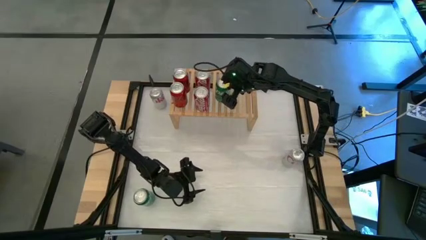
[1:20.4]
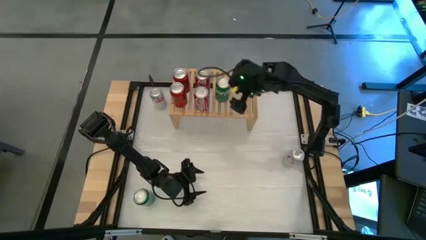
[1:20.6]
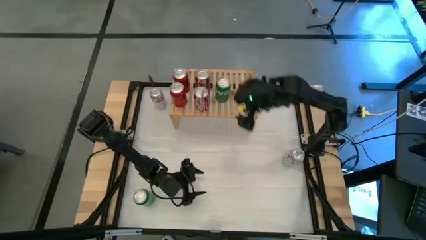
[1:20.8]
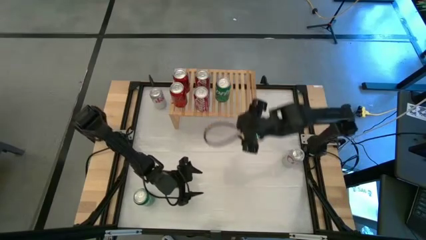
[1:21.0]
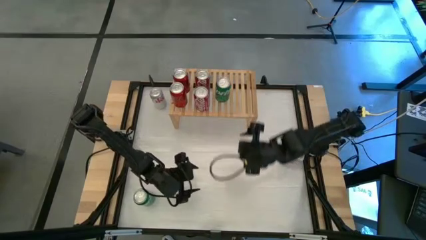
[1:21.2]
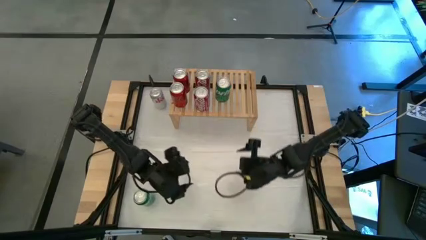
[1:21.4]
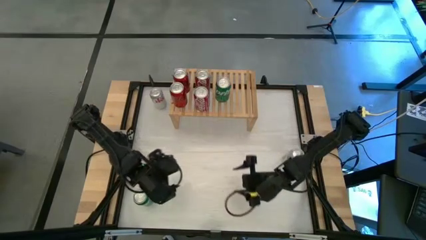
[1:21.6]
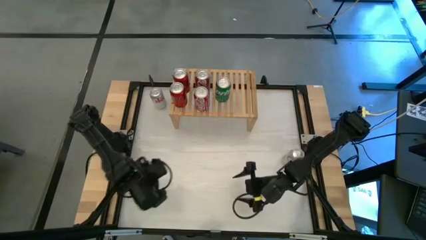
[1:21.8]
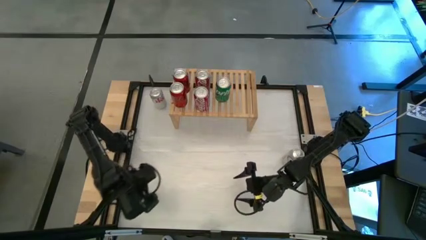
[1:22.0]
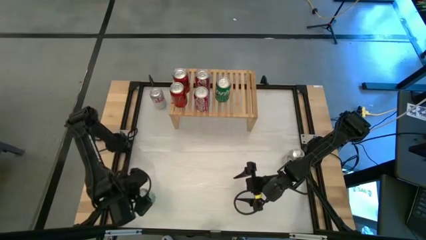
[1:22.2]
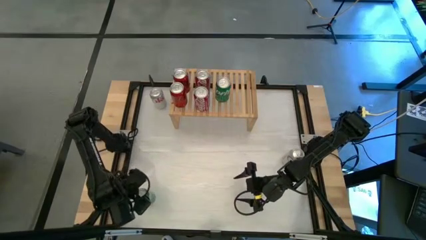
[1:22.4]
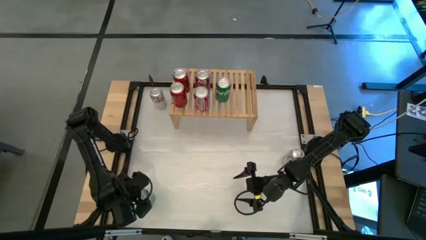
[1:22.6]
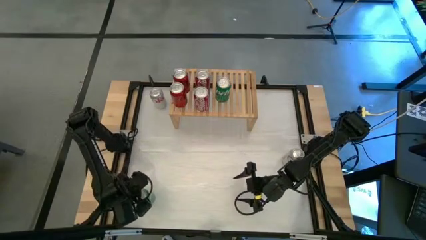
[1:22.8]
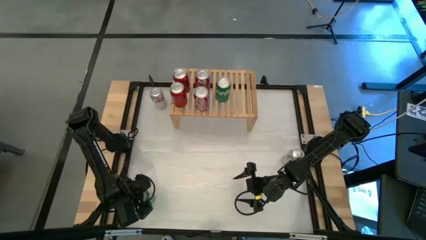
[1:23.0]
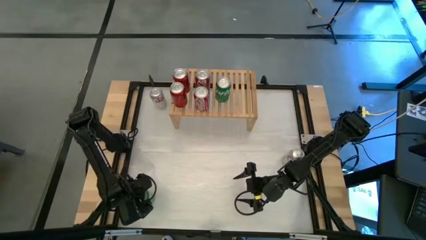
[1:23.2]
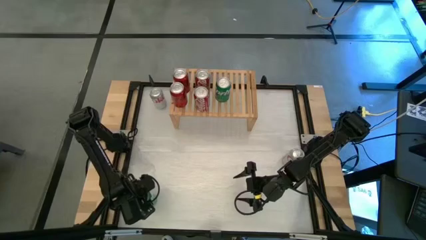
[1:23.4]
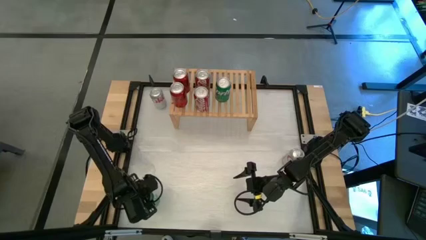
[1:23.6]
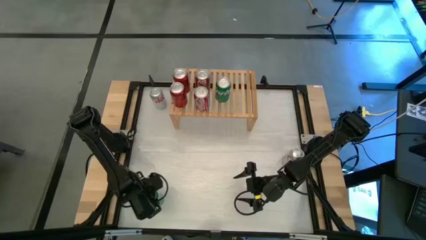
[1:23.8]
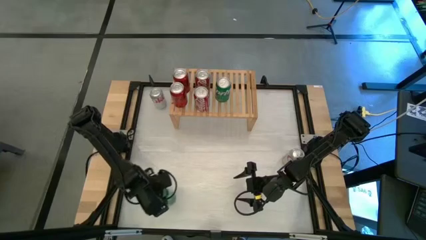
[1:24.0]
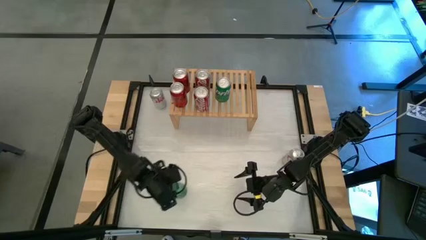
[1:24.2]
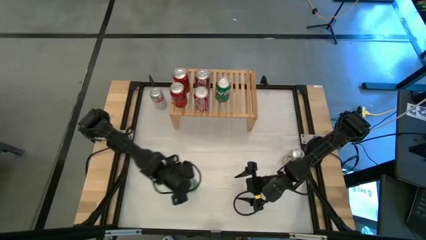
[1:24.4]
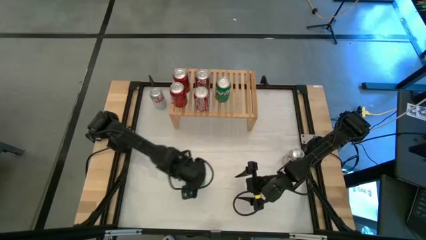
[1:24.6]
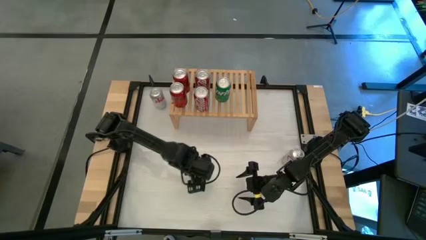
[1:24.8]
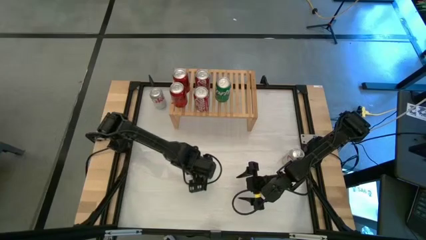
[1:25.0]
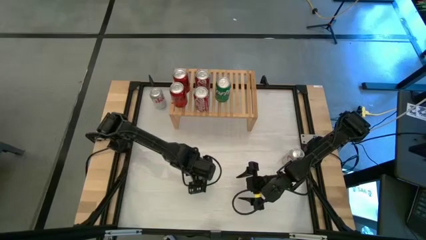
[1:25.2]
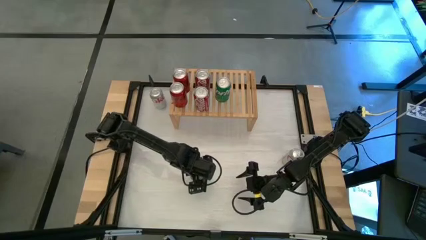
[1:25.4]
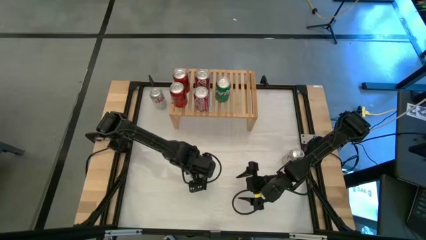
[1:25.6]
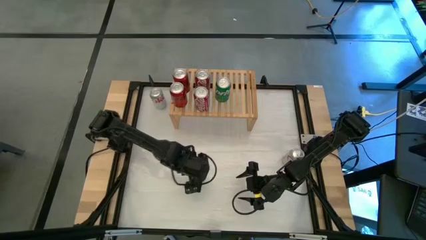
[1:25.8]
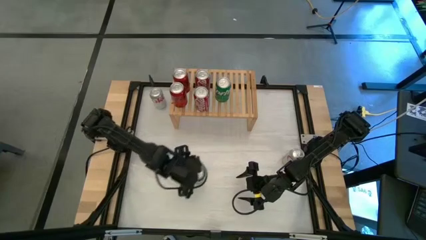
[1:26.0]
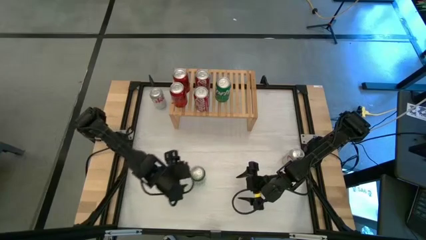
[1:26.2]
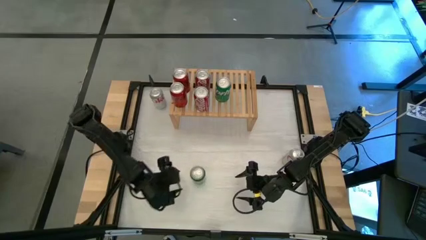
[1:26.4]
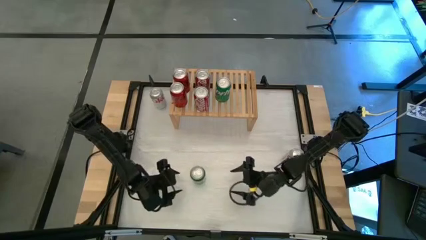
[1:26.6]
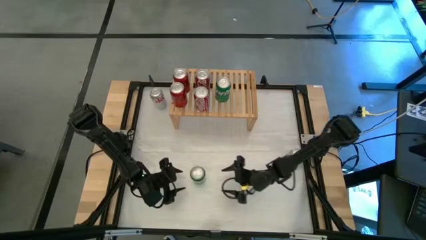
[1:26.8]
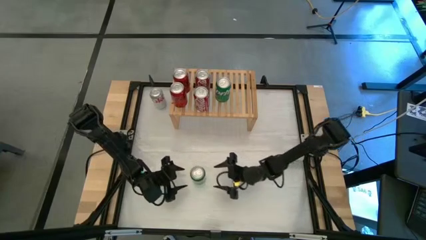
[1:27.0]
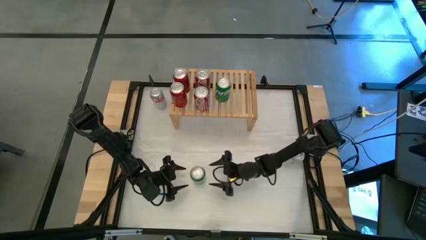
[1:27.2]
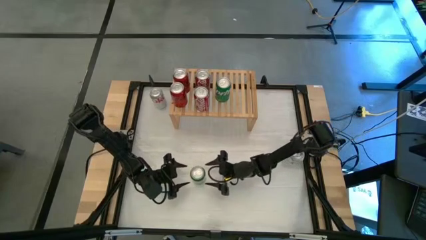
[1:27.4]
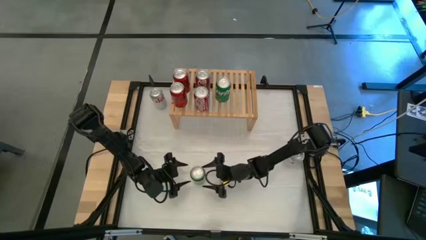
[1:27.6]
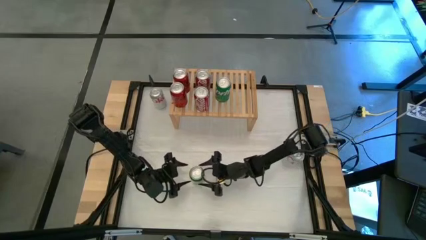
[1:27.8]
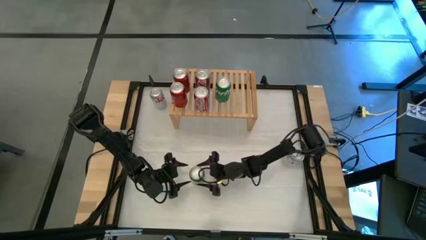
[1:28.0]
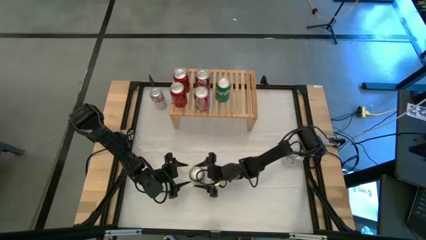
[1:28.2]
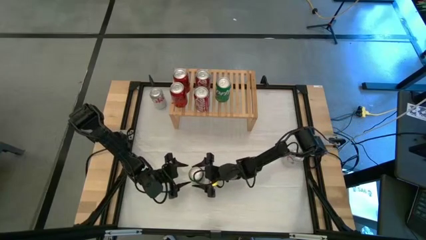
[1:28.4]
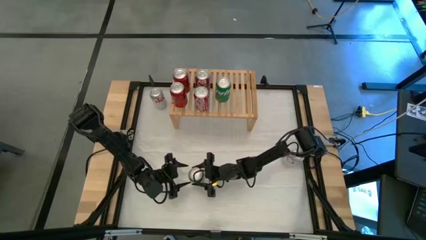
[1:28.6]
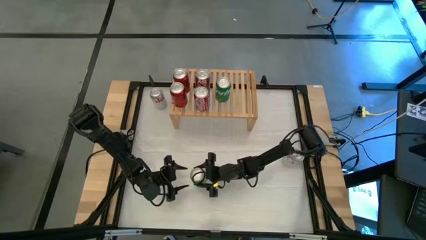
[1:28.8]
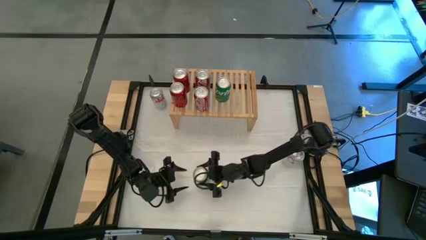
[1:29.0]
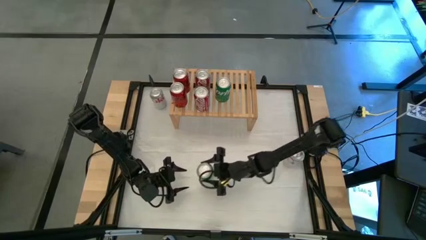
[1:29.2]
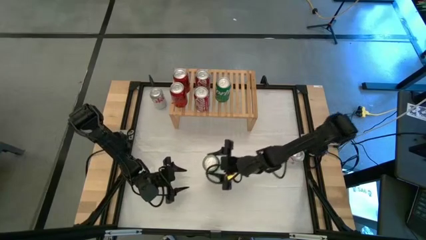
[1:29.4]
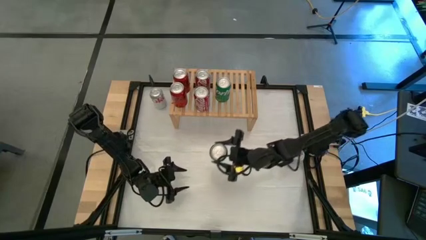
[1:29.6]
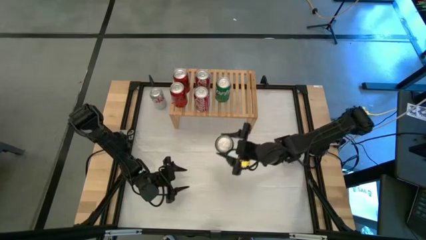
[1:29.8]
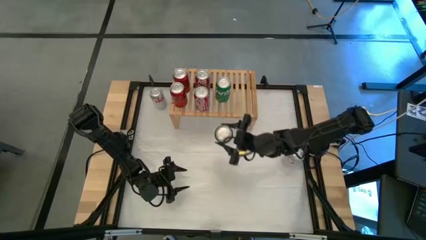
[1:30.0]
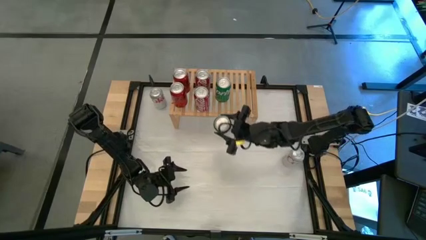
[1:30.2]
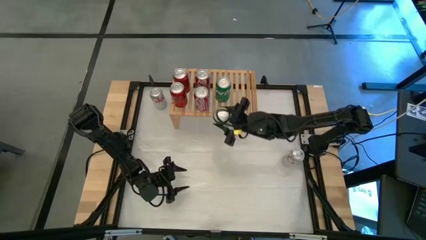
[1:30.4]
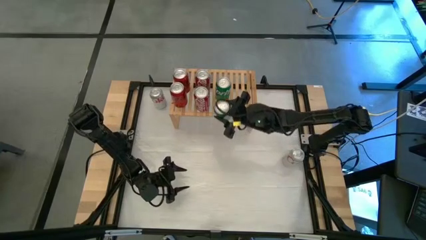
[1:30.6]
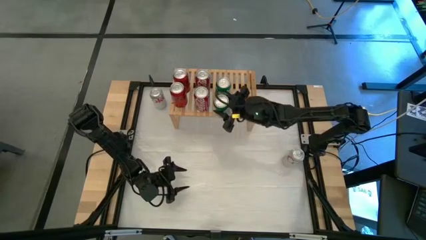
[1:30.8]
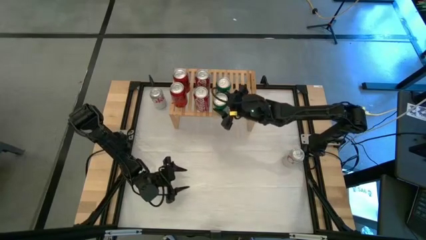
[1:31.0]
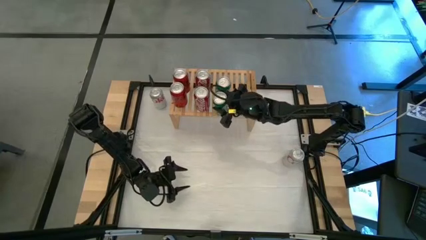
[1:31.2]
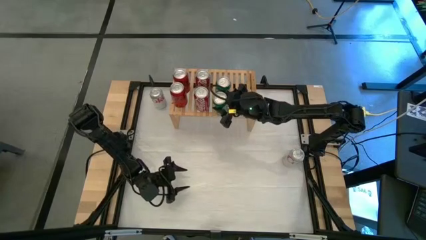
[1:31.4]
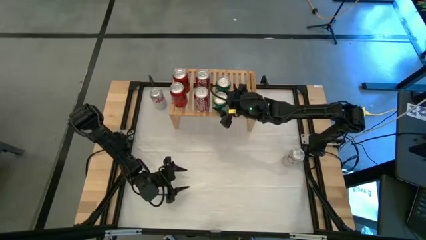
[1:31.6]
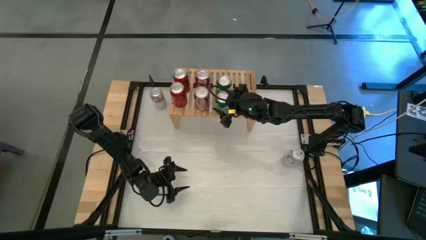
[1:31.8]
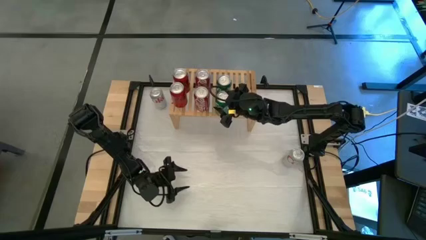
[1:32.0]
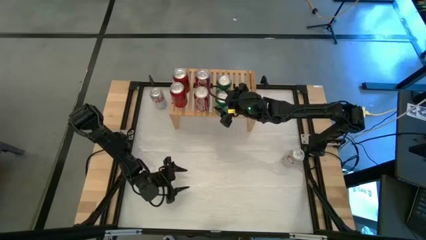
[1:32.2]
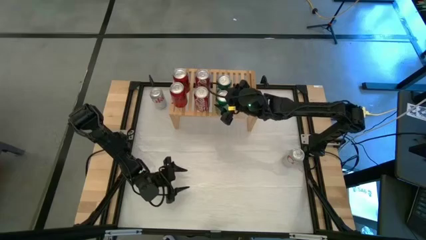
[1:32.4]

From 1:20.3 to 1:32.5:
Task: Place canned beverage on shelf
Put the green soda can on the shelf aligned with the other green soda can

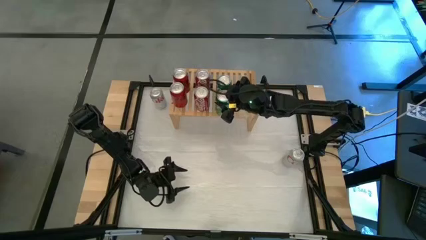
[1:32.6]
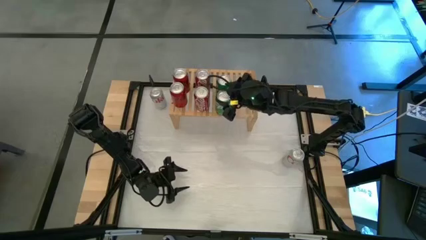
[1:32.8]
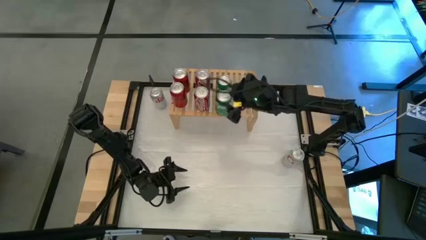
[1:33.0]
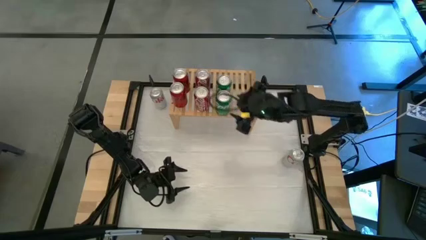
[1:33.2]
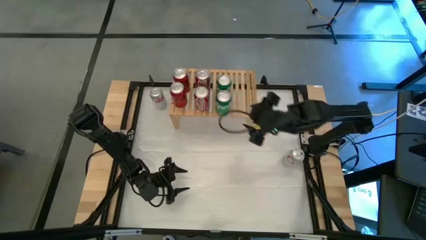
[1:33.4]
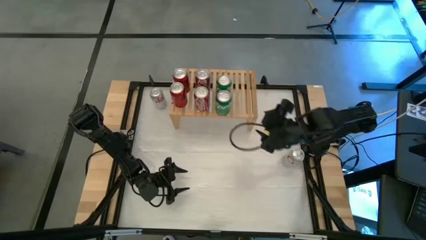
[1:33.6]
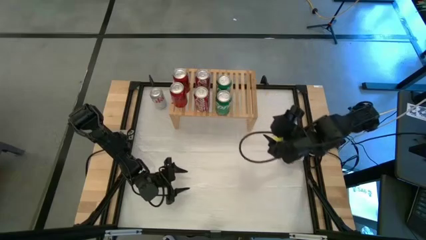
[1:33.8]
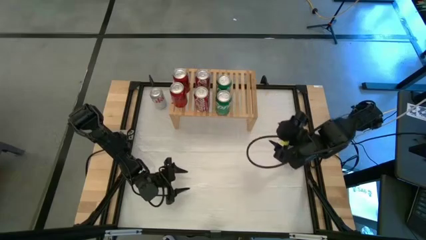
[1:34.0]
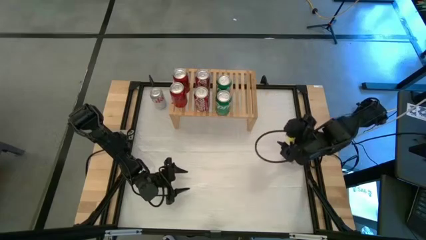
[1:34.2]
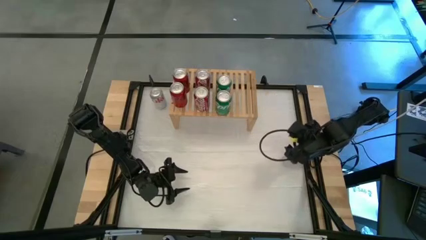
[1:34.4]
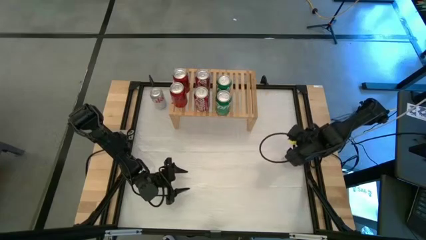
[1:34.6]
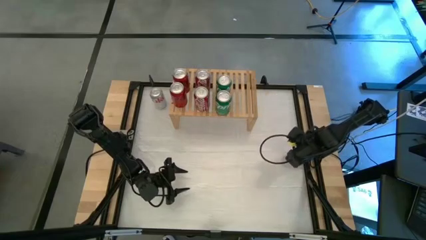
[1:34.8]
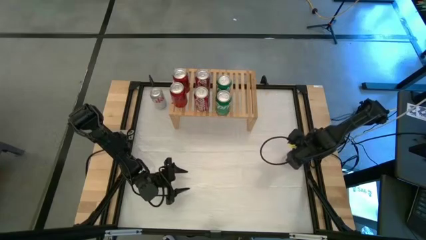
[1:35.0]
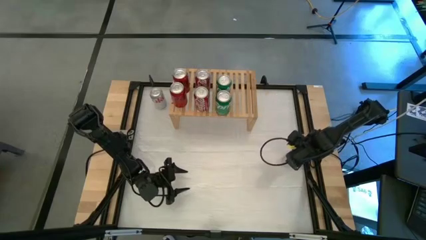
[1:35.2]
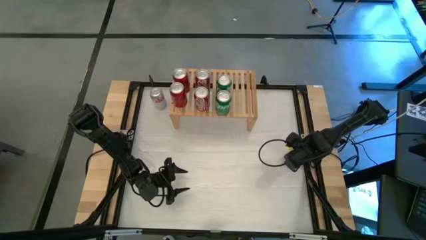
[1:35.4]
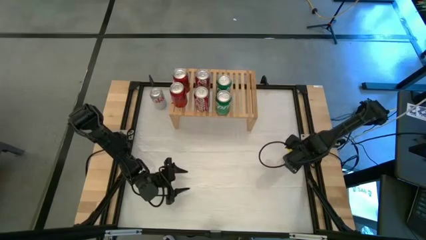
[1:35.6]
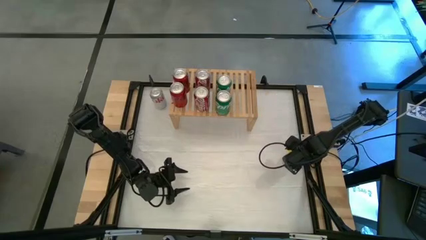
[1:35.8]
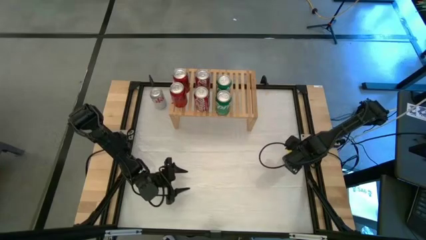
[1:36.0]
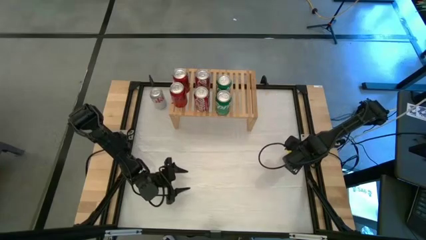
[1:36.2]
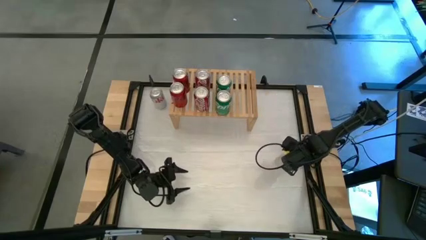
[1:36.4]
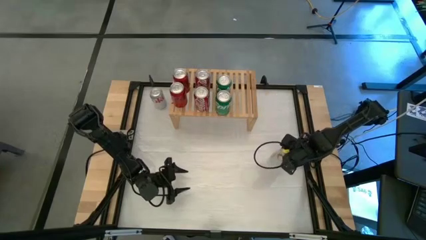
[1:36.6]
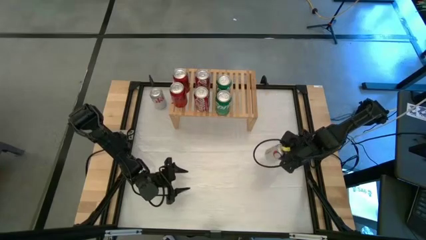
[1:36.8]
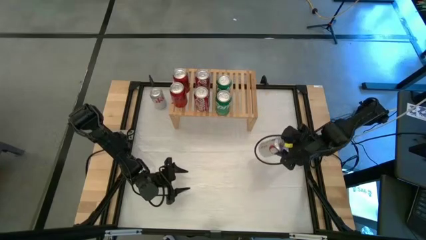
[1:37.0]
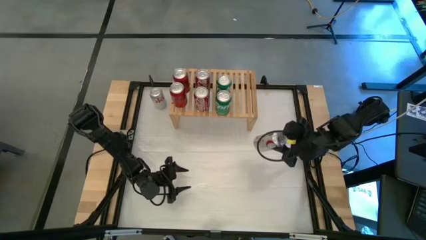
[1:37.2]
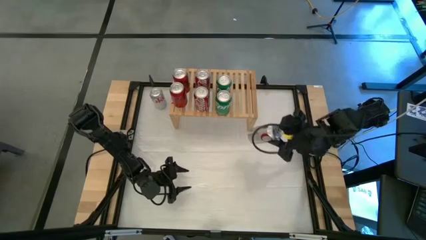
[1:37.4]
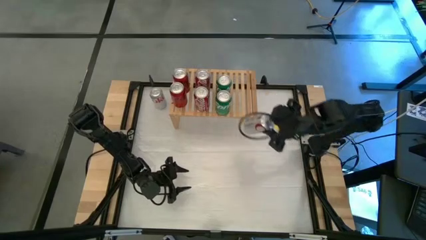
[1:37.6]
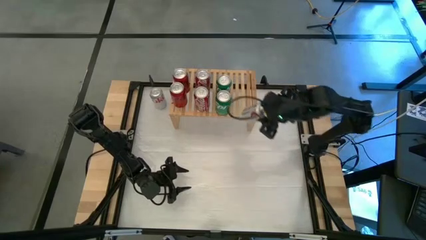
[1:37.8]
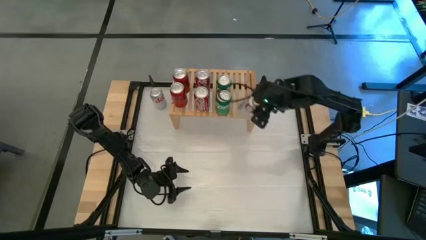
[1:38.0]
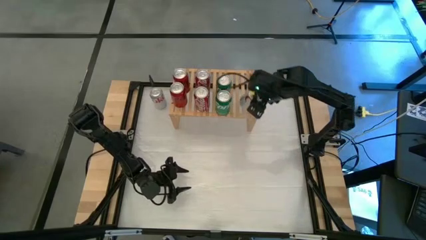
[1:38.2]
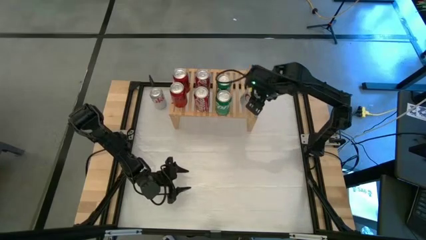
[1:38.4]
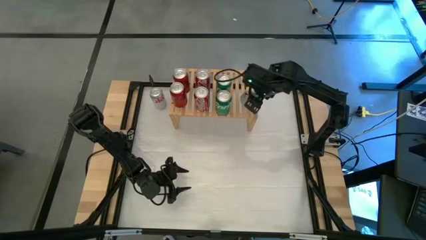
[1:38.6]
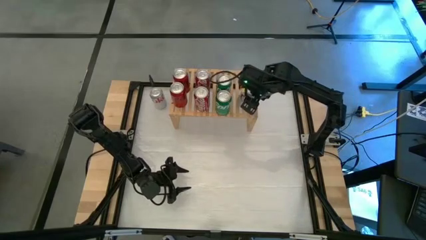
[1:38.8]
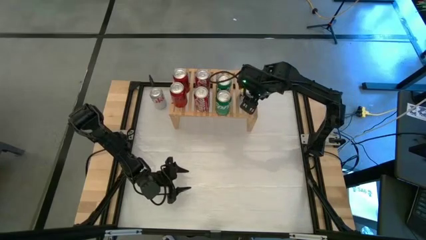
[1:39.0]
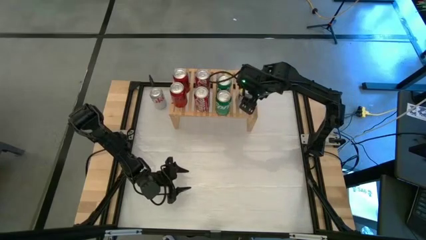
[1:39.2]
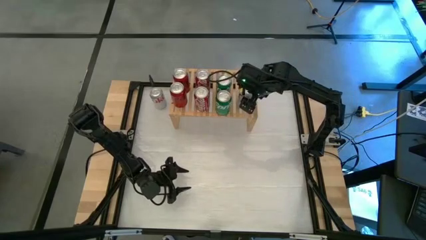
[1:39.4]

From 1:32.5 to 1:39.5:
Put the silver soda can on the shelf
